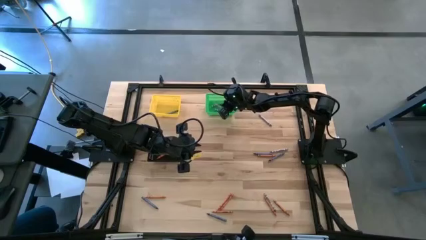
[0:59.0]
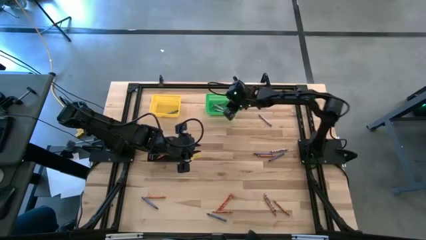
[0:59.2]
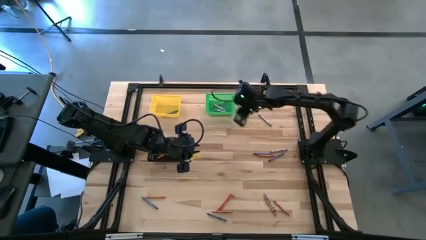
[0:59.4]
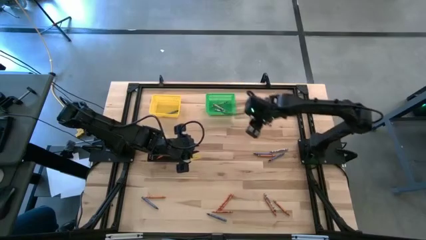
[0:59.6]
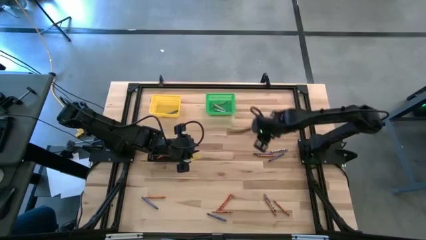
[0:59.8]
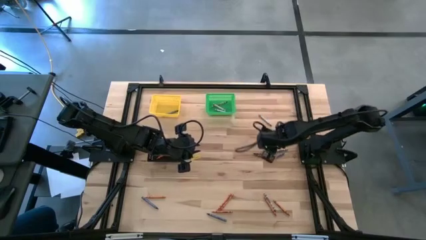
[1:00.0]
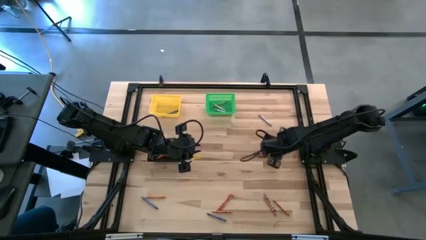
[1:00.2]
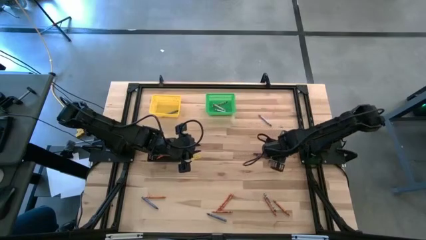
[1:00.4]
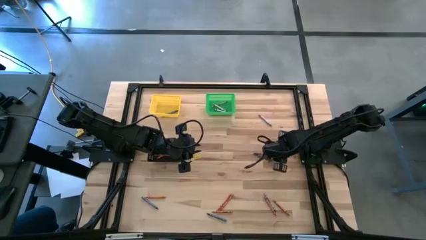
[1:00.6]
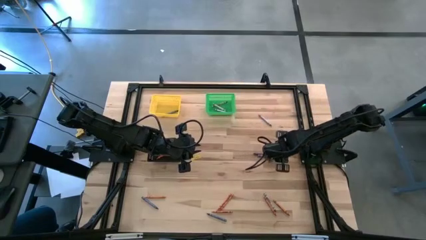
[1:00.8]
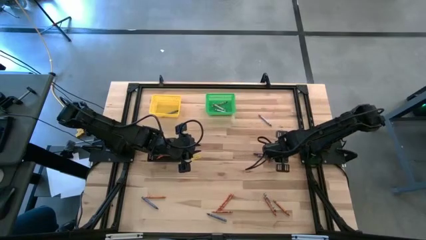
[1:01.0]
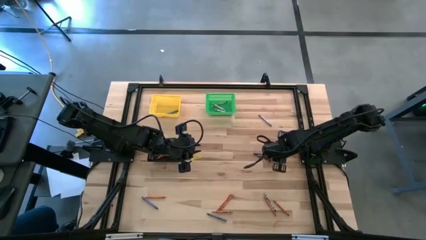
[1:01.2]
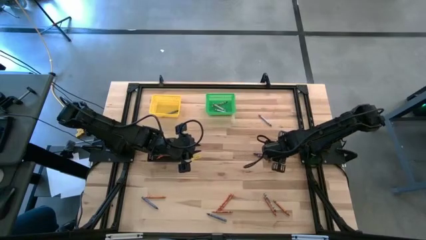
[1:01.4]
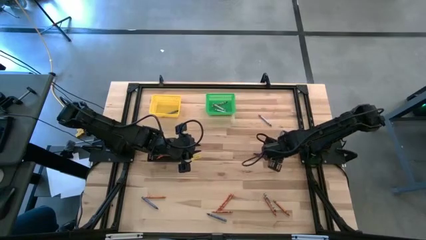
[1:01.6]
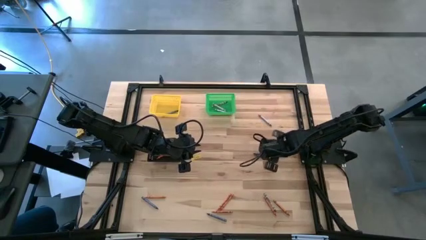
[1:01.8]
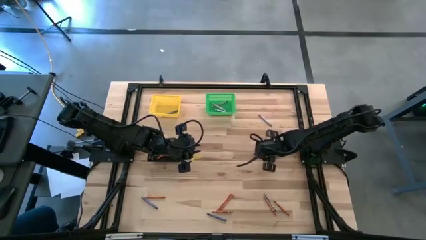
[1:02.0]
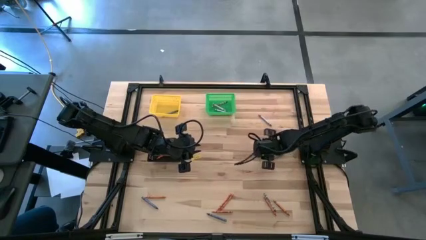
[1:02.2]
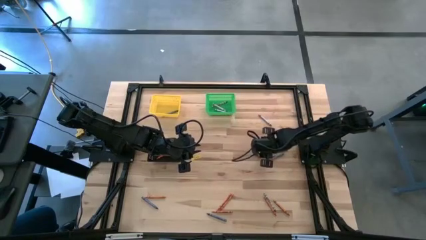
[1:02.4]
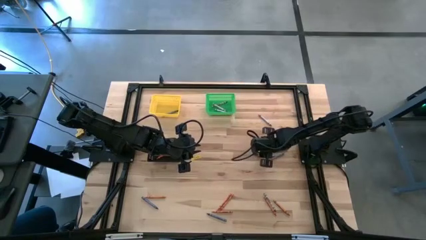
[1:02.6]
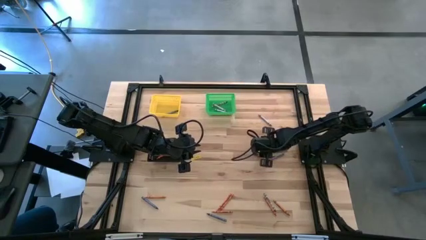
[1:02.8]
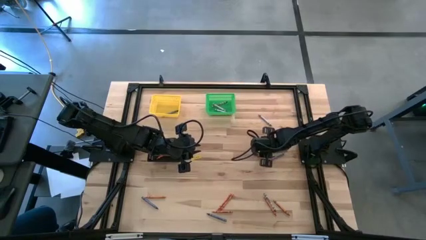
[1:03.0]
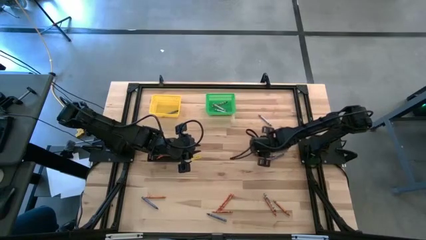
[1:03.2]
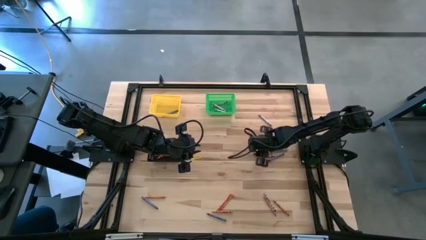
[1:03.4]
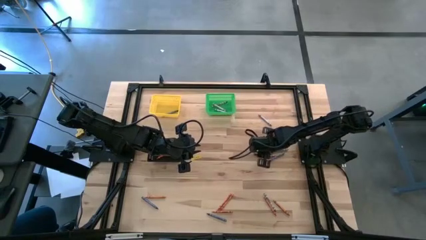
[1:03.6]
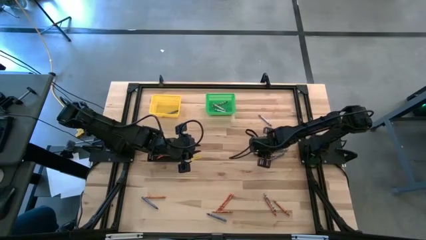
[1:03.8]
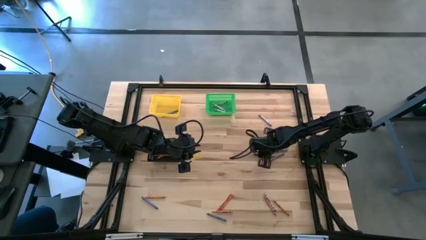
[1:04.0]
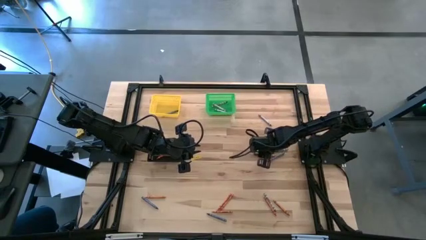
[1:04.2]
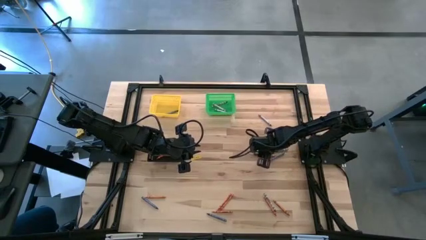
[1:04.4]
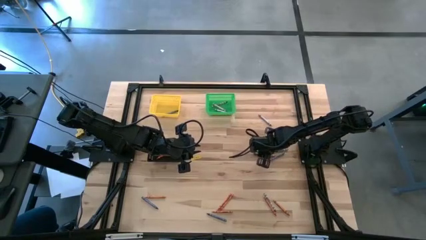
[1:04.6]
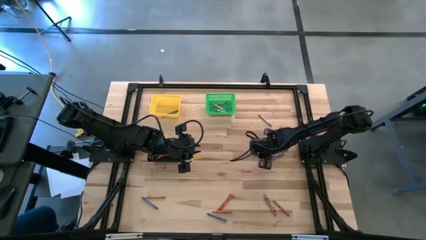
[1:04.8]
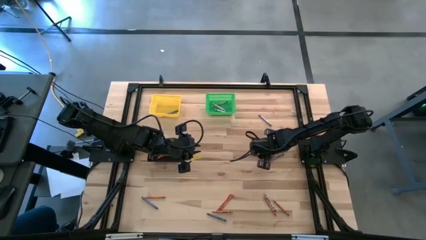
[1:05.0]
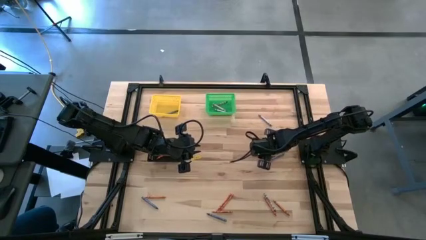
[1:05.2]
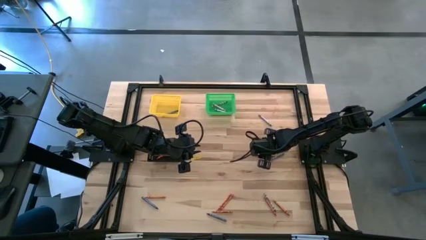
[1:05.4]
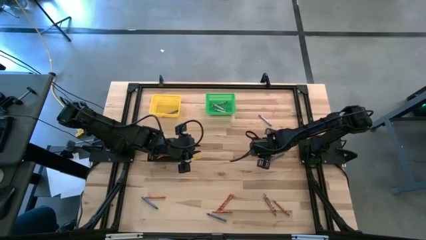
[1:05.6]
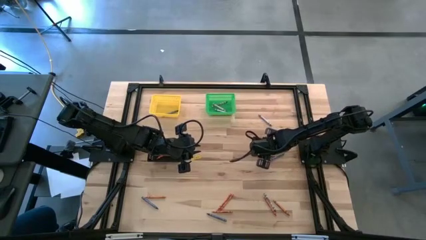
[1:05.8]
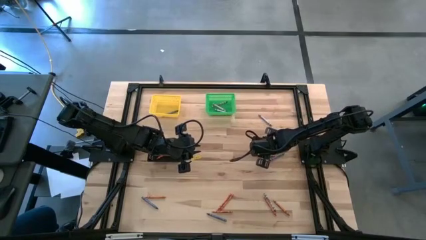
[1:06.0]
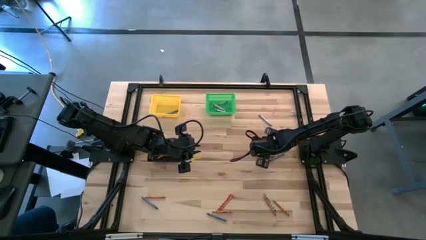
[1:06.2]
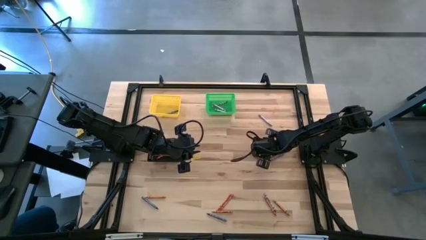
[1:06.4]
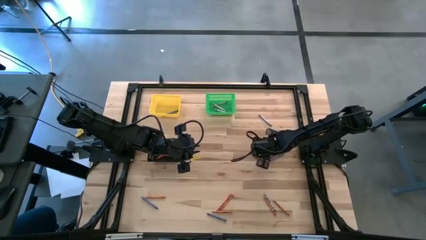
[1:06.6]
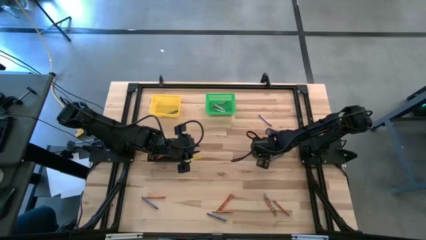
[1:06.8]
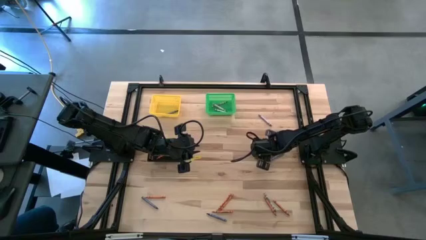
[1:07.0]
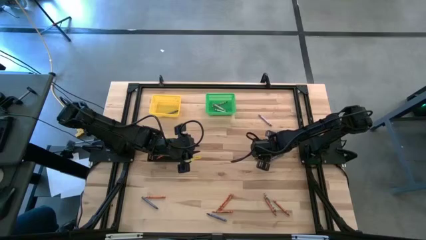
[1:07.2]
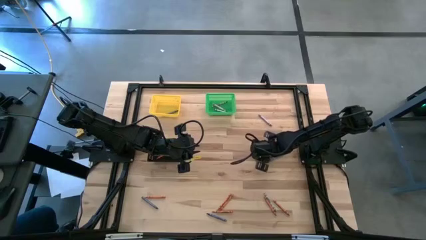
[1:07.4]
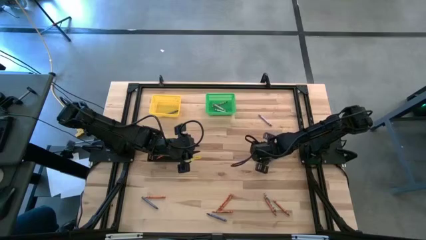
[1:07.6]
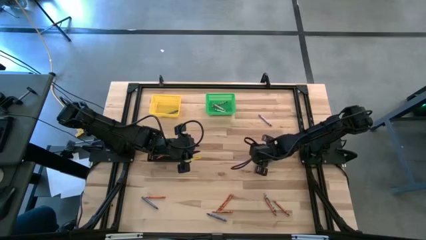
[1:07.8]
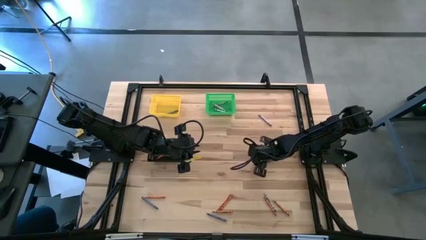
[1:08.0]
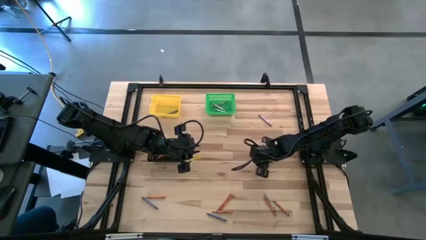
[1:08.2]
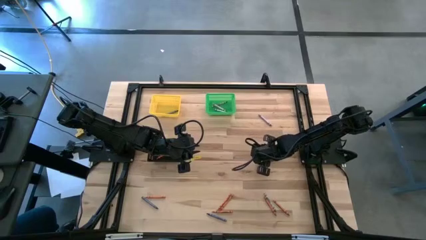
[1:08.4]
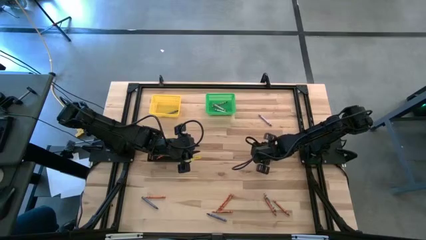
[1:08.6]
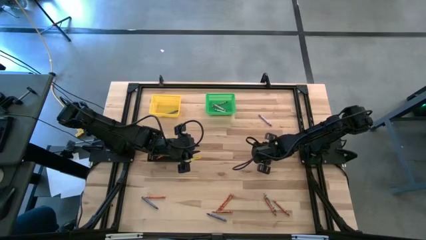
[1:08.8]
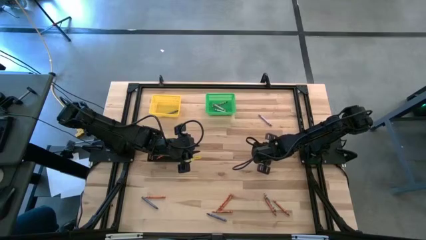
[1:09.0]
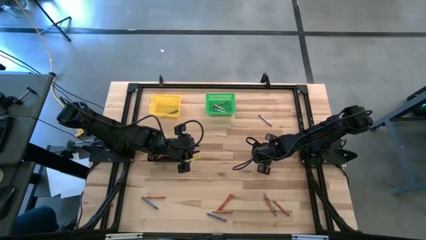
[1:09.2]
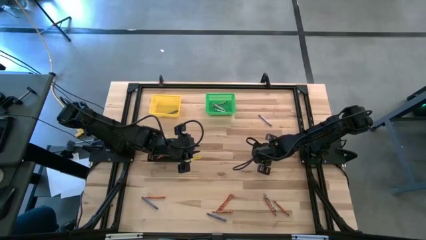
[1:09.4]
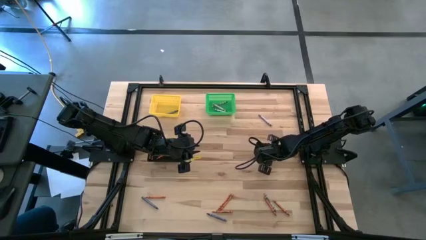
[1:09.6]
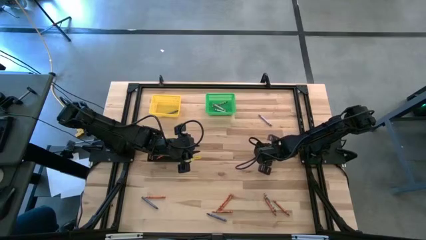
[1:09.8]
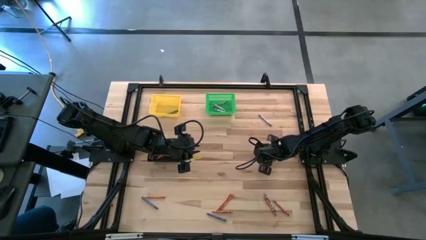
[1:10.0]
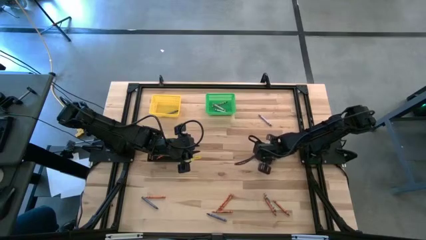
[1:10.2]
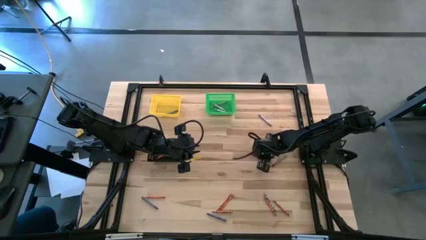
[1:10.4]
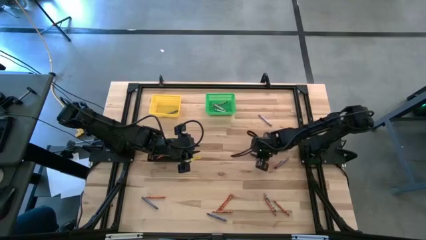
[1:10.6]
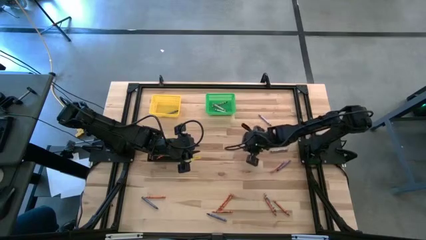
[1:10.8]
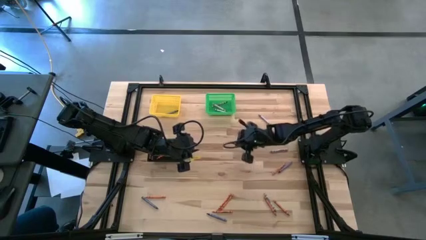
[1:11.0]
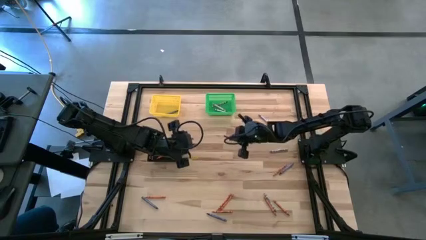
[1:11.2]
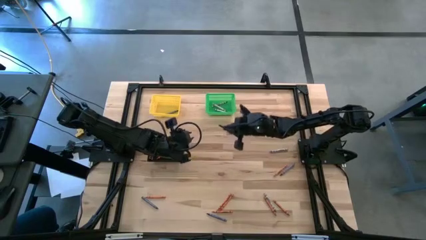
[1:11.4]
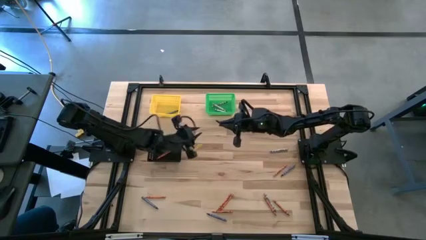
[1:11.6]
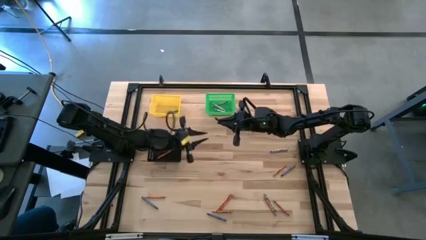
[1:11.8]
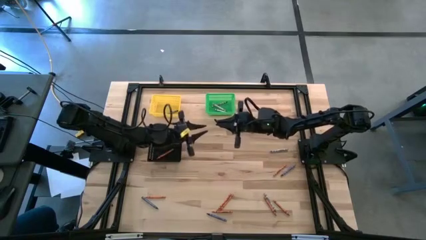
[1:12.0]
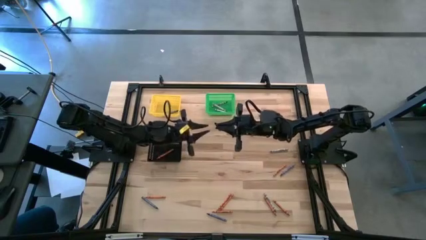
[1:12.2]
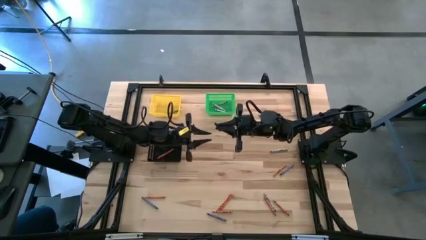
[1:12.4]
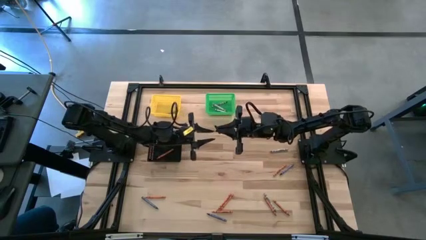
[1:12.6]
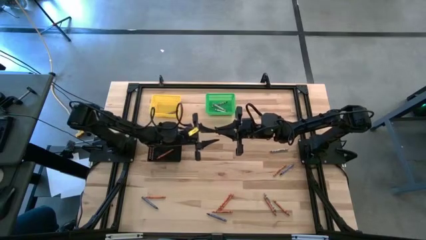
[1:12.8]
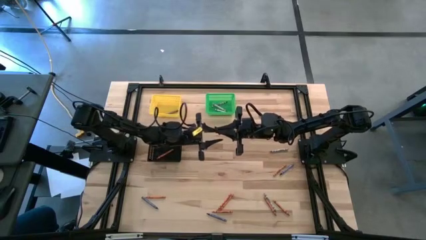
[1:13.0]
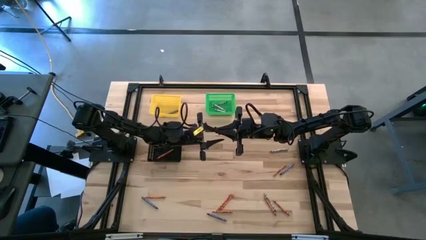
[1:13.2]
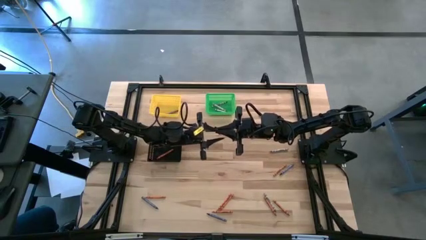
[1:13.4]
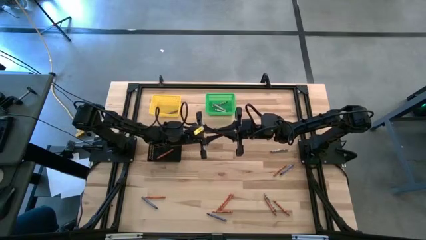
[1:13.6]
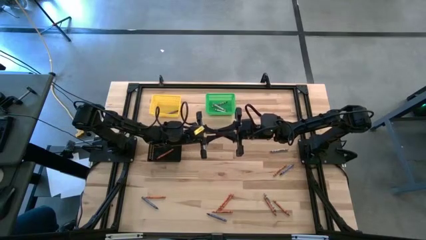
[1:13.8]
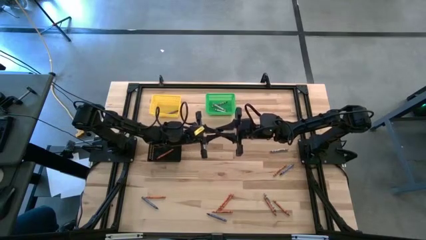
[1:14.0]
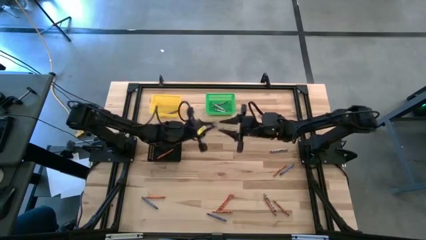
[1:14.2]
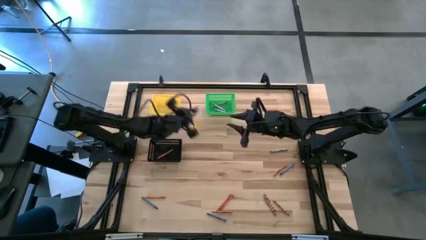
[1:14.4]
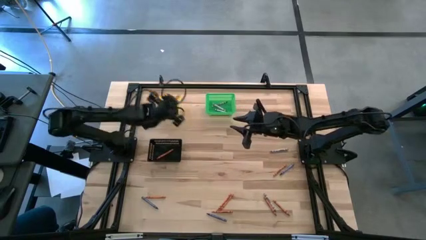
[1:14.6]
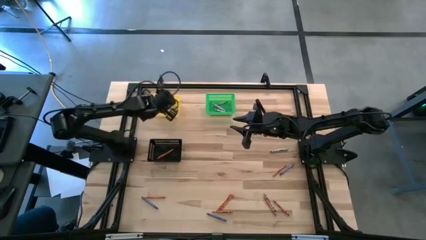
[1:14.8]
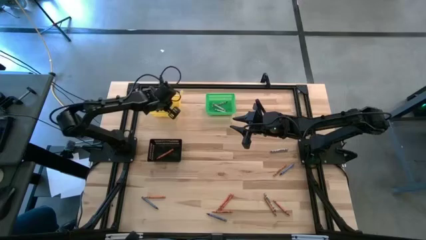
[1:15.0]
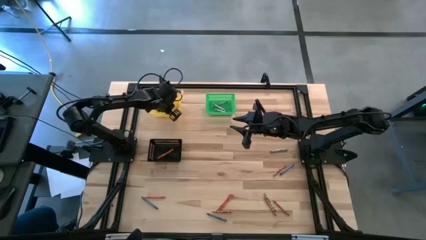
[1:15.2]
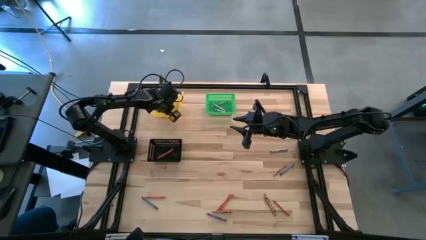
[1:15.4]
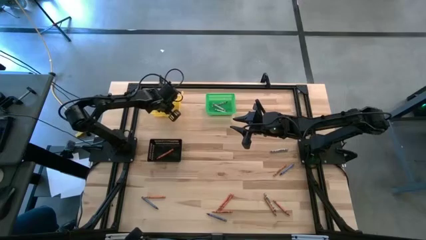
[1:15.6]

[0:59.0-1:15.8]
Task: Sort crayons
Put the blue crayon into the yellow bin
